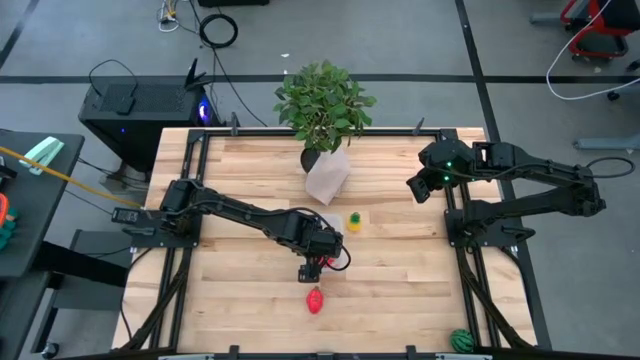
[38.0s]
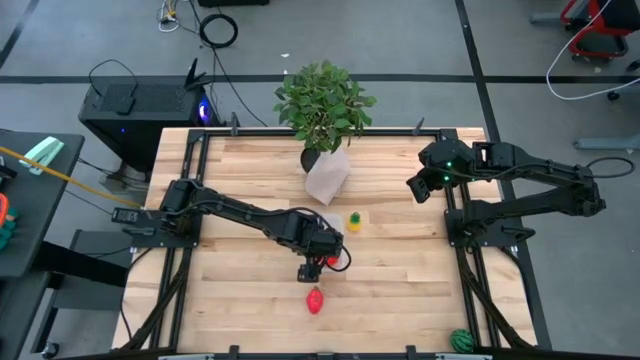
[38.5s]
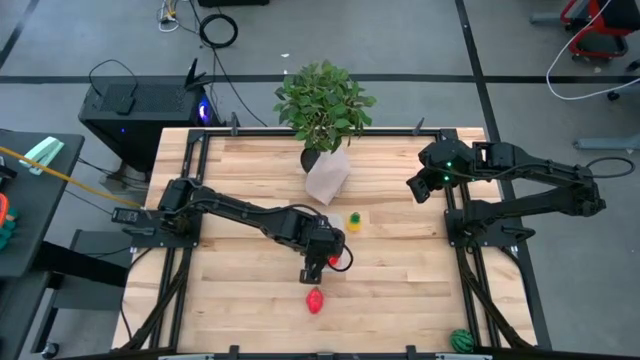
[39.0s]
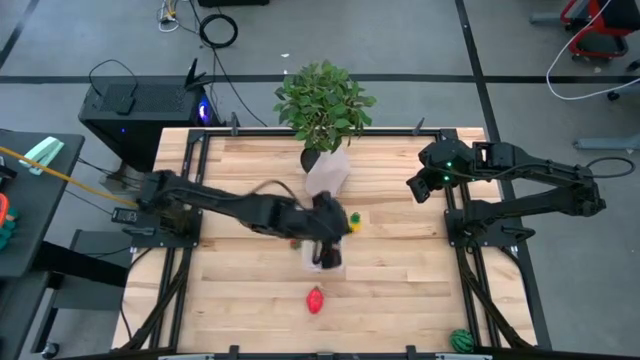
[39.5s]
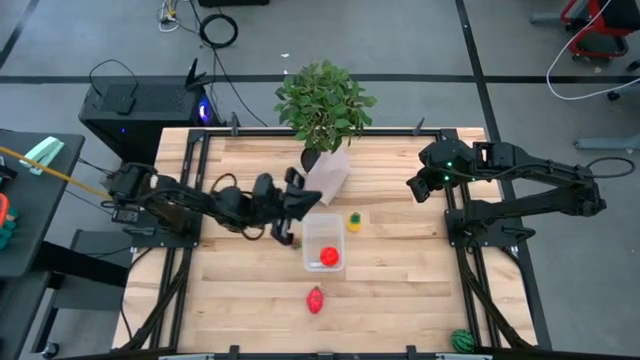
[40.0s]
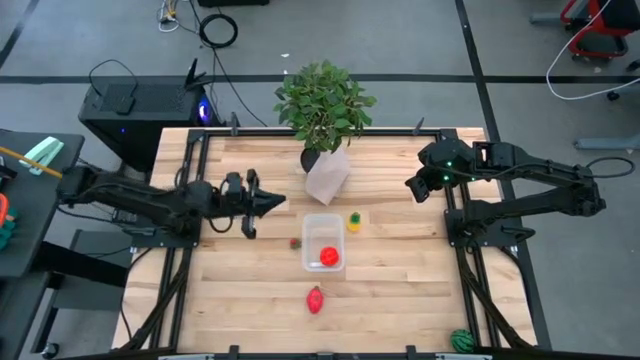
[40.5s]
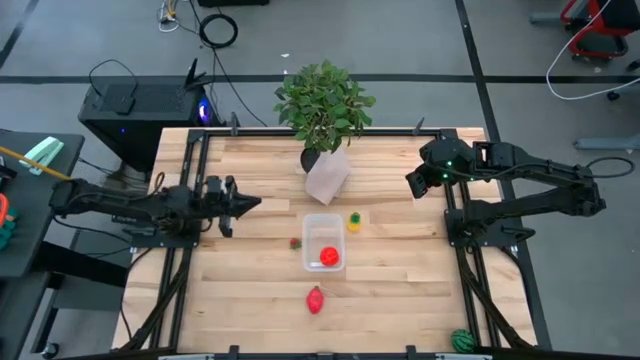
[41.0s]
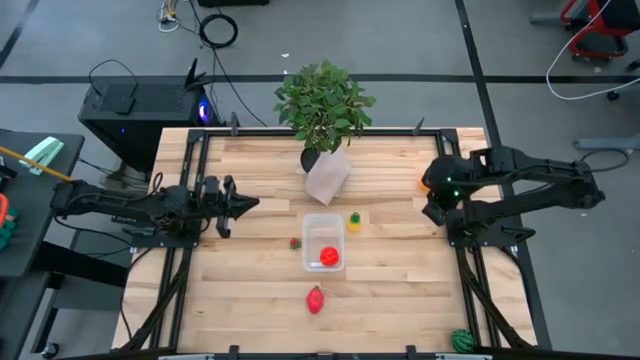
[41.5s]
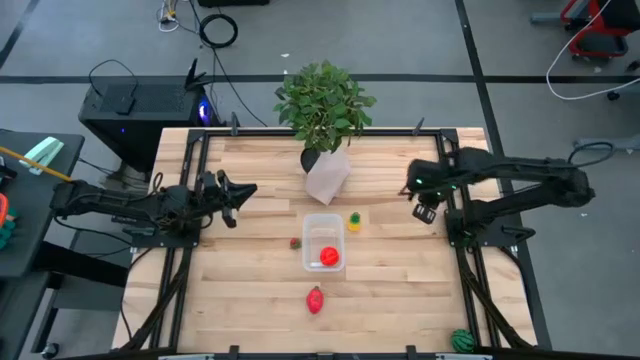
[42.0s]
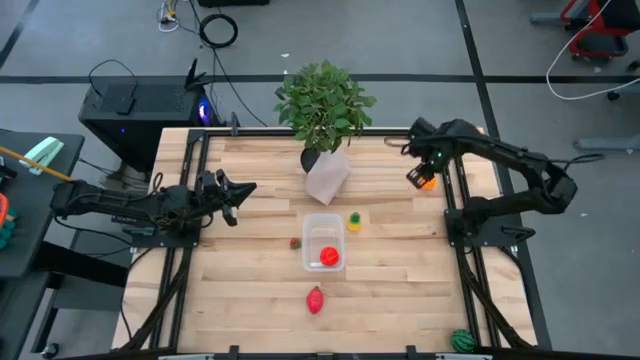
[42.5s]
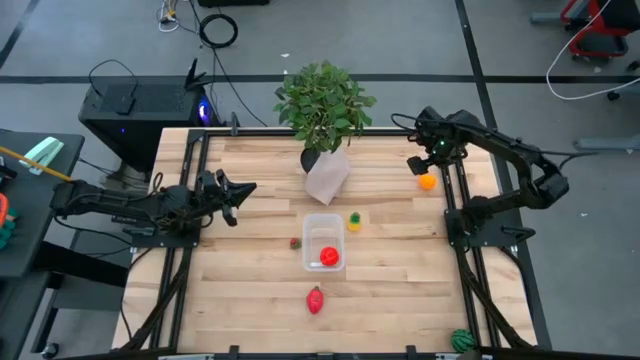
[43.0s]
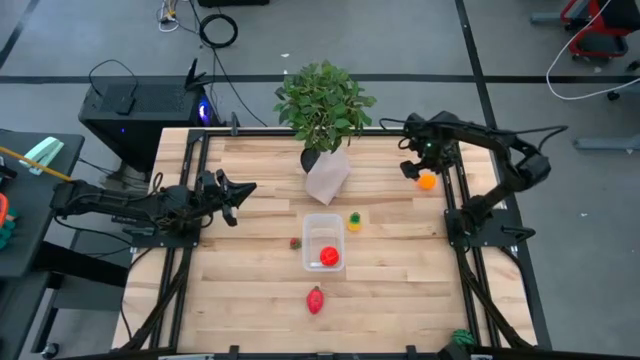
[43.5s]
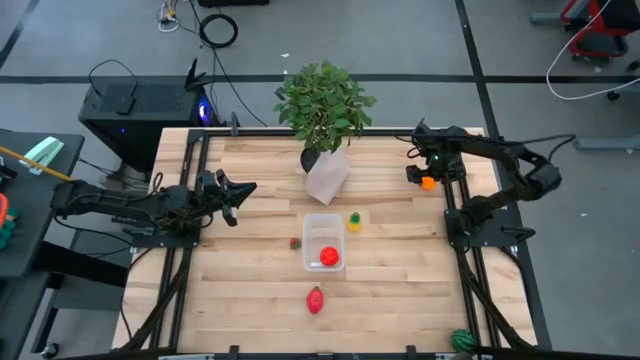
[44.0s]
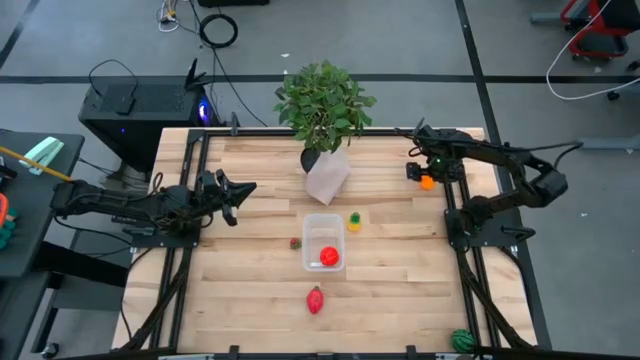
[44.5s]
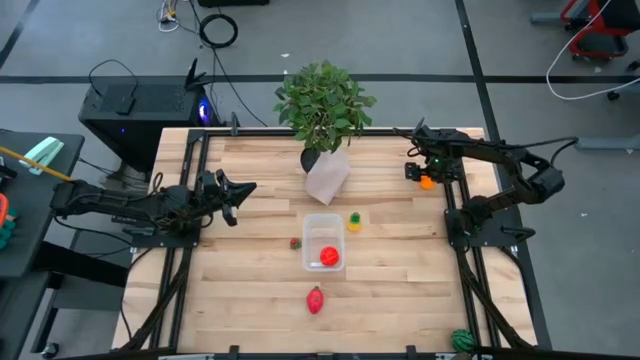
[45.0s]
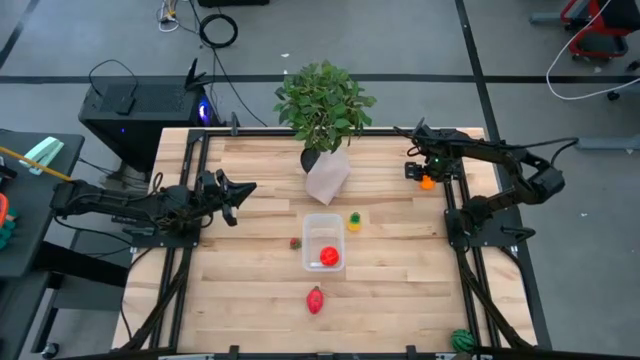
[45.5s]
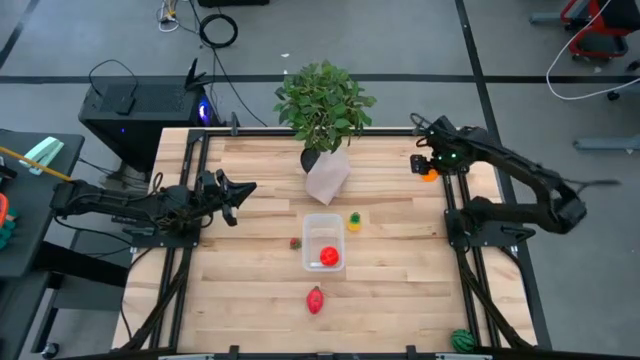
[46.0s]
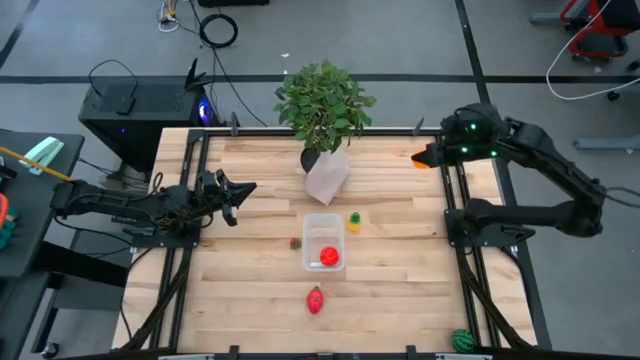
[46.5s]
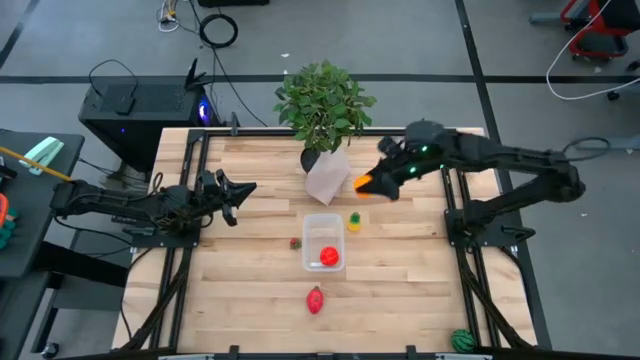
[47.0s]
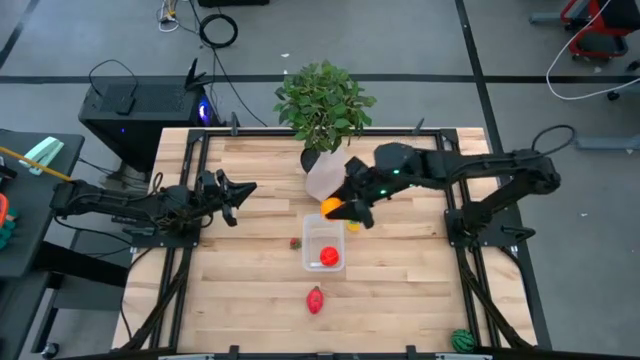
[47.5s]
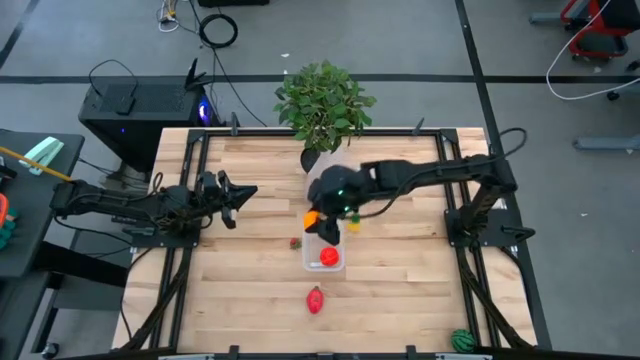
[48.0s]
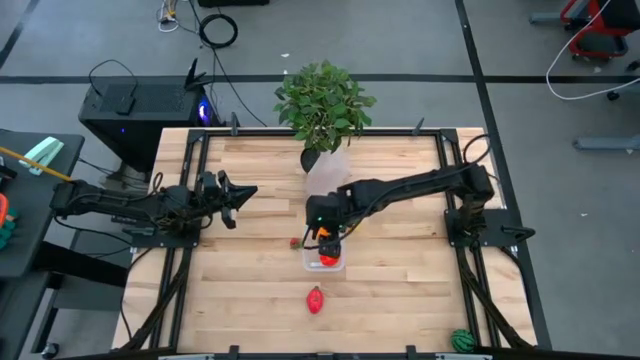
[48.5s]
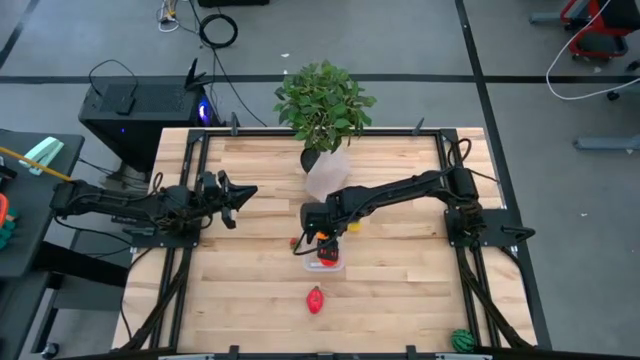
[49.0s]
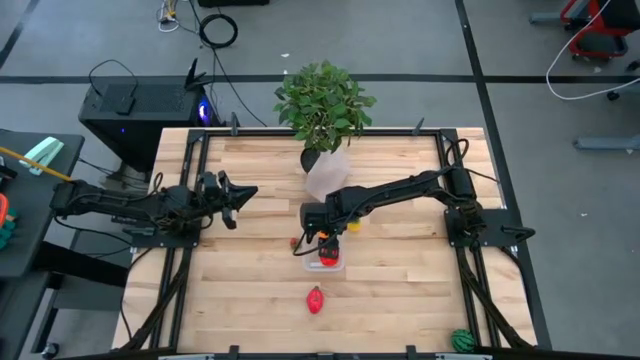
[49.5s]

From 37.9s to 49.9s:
Task: Pick and placing Produce into tupperware
Put the orange into the transparent bin

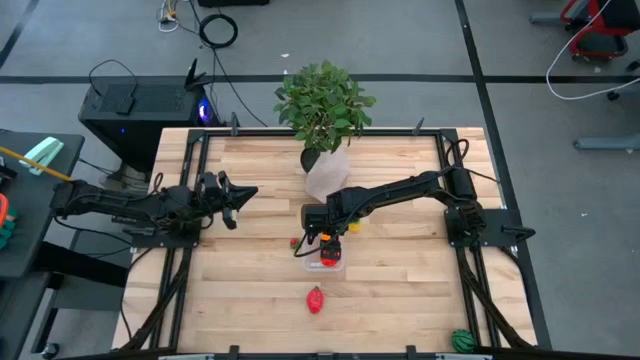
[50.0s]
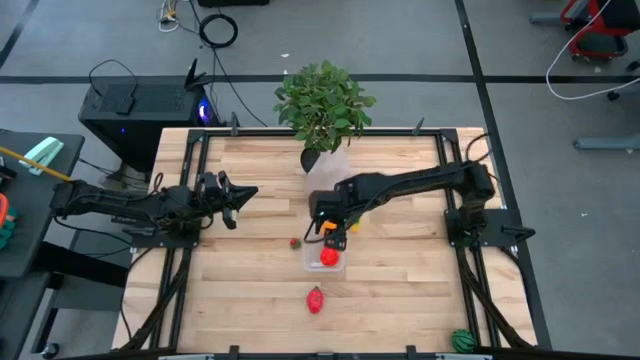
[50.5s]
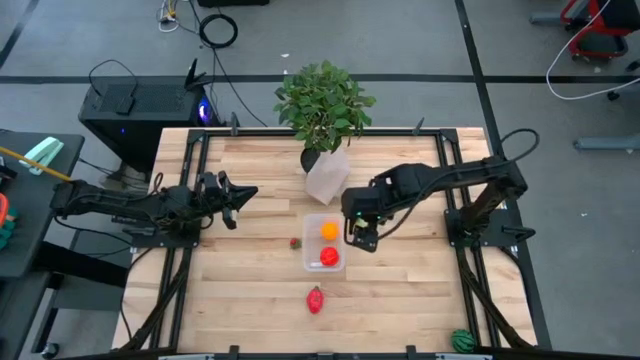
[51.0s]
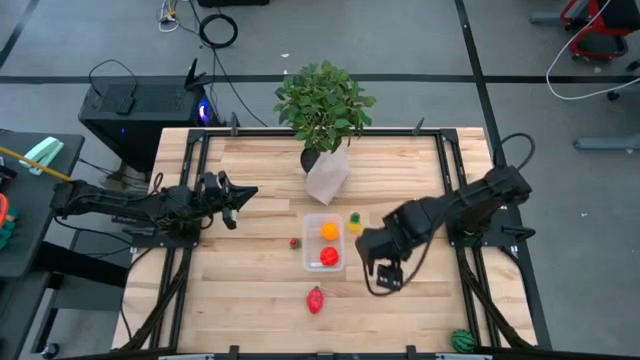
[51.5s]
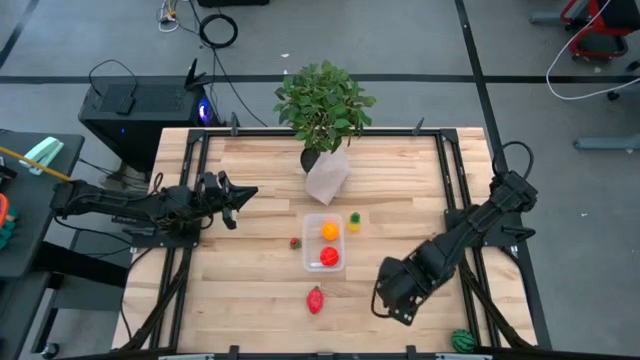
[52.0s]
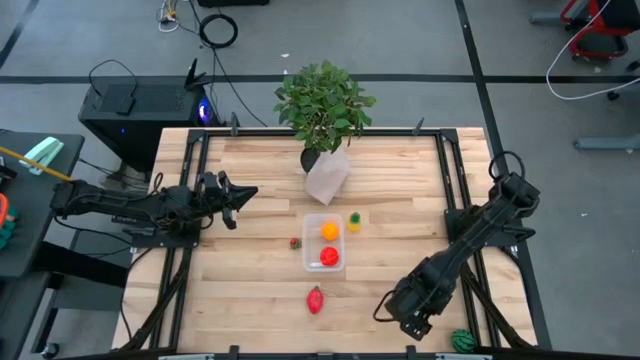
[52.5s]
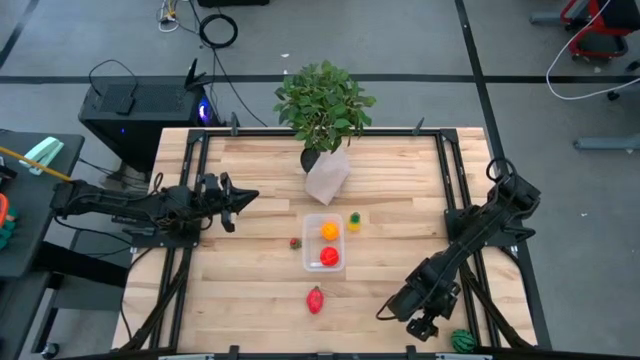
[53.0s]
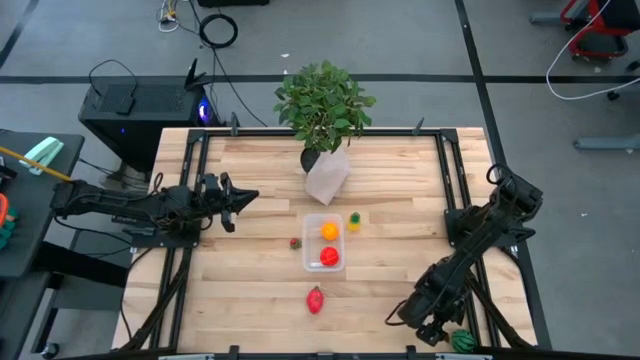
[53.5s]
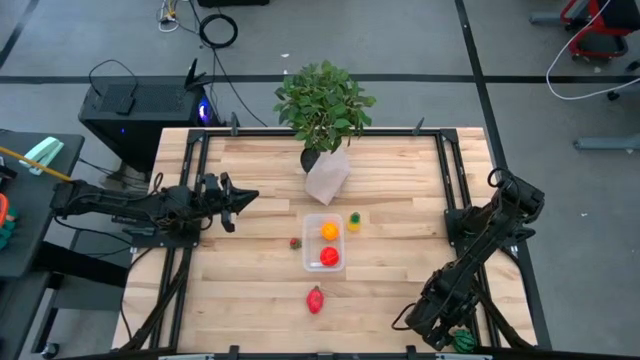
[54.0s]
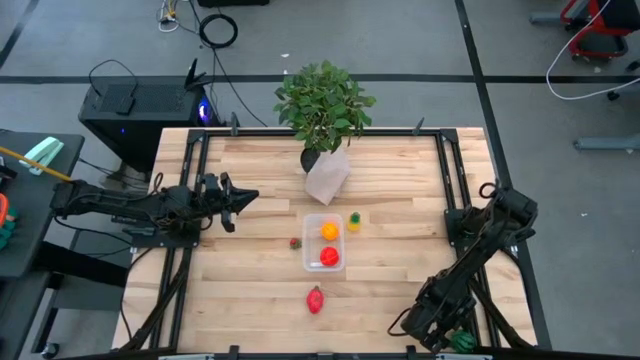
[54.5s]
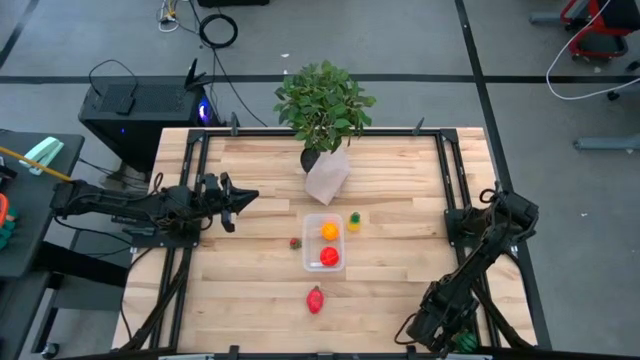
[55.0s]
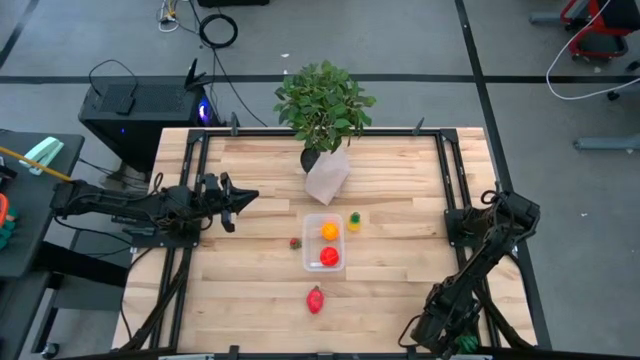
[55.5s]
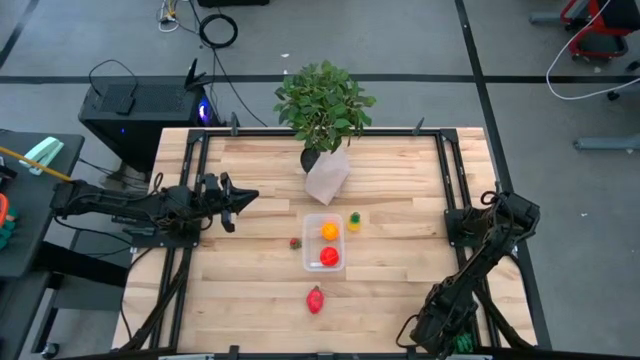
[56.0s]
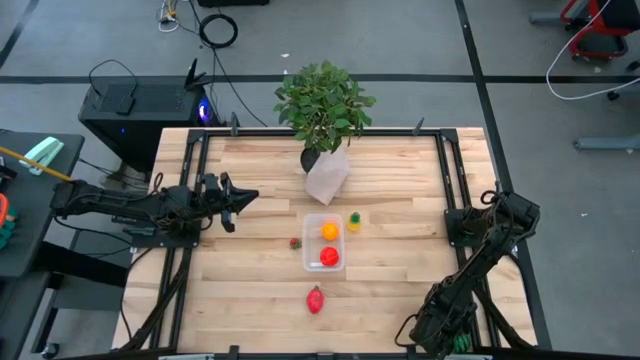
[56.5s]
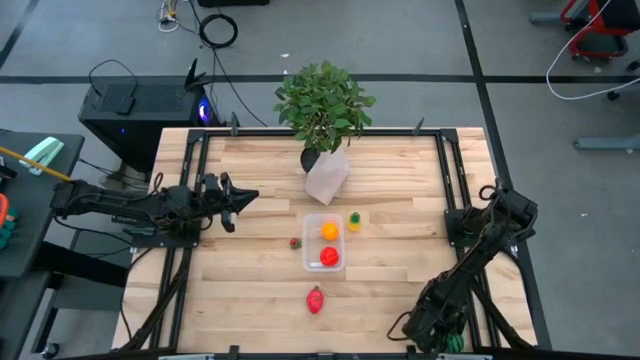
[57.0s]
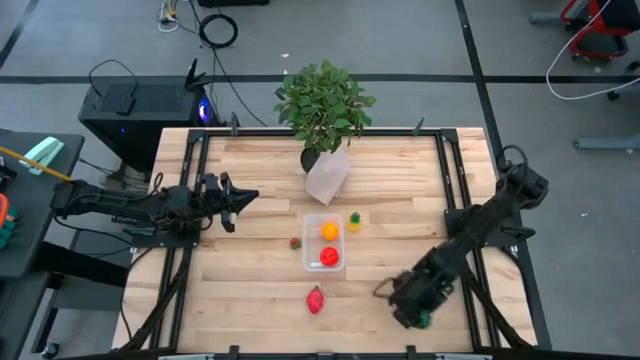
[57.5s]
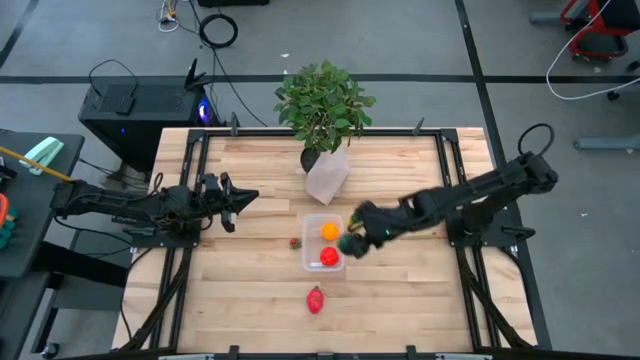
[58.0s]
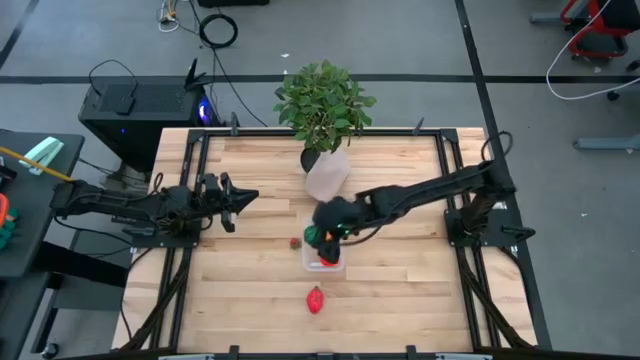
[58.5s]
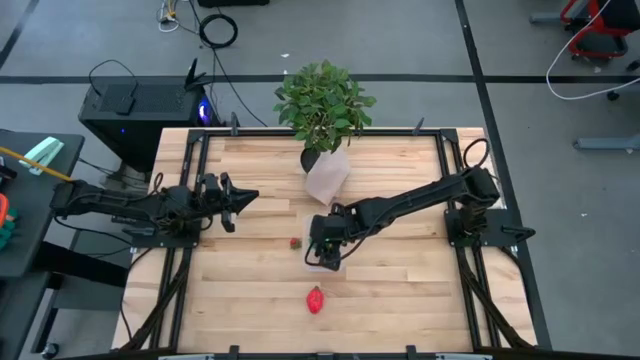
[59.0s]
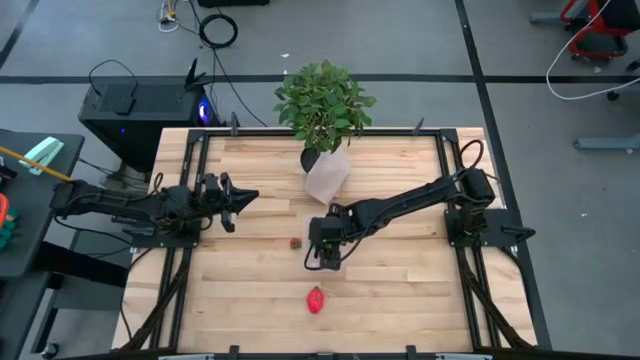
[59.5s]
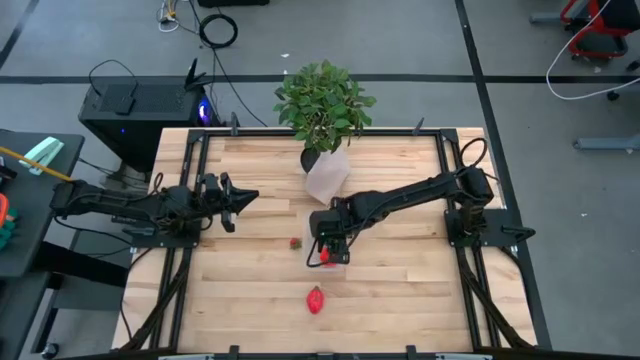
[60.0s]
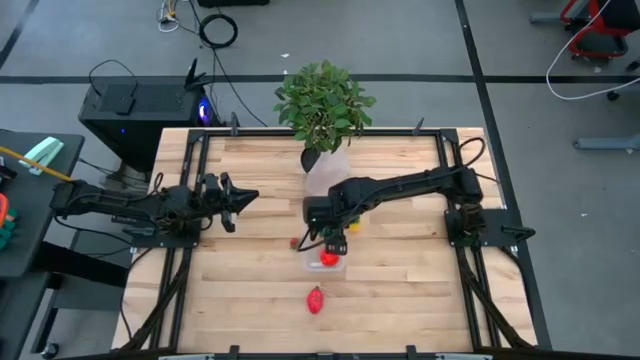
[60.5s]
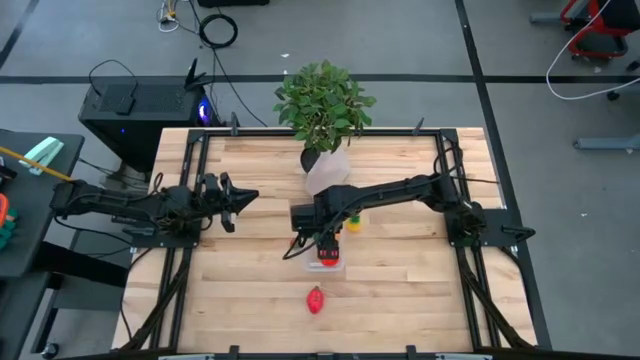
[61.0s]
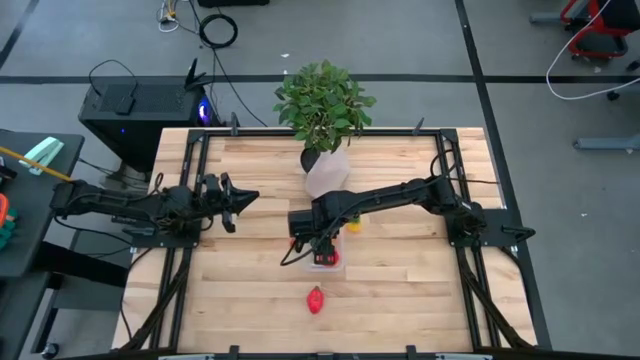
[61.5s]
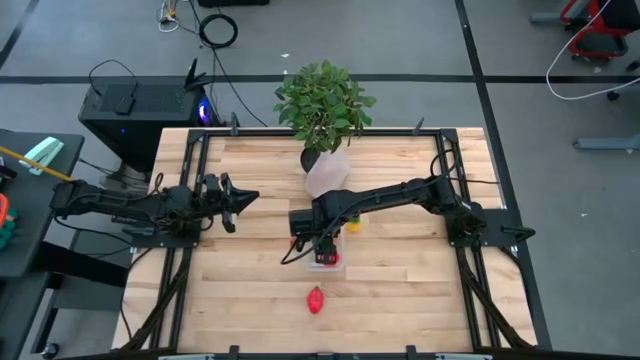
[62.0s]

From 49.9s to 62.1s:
Put the green watermelon into the transparent bin
